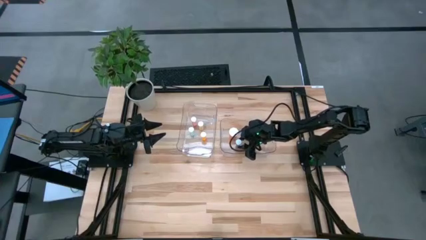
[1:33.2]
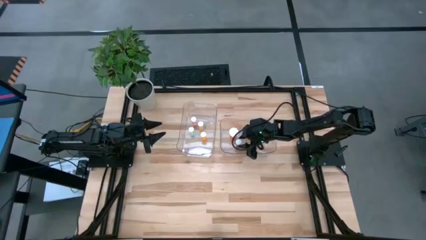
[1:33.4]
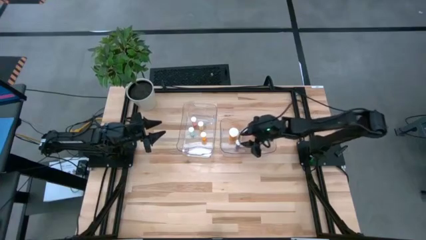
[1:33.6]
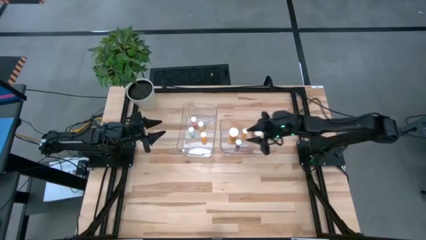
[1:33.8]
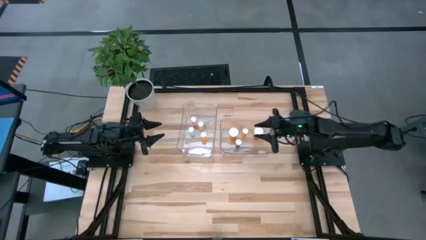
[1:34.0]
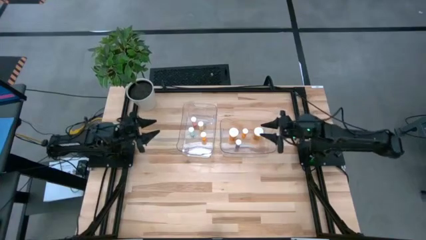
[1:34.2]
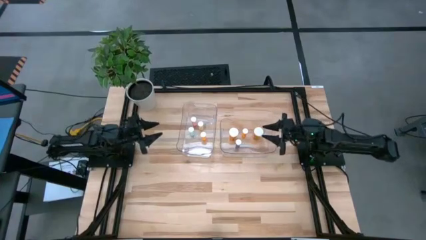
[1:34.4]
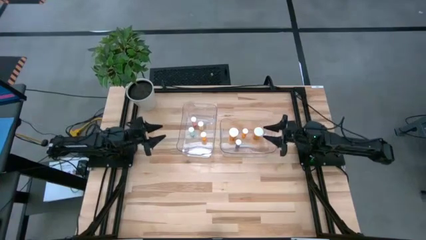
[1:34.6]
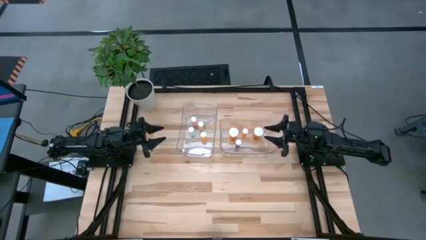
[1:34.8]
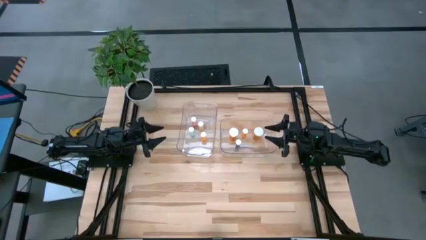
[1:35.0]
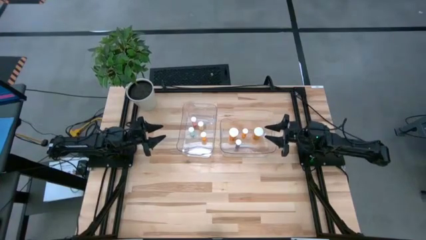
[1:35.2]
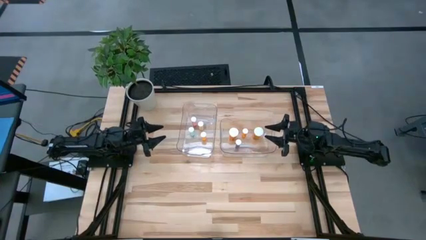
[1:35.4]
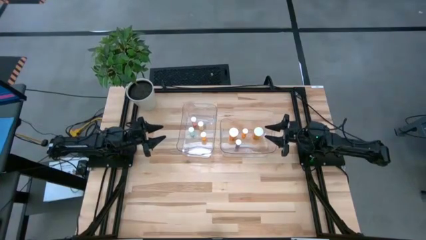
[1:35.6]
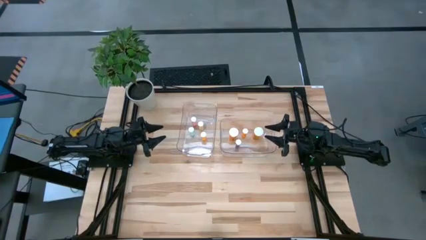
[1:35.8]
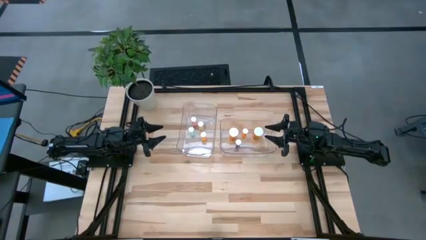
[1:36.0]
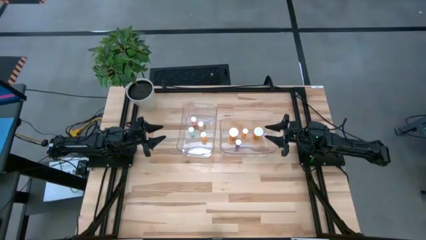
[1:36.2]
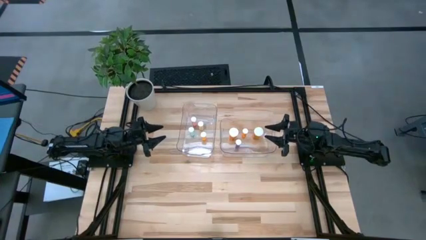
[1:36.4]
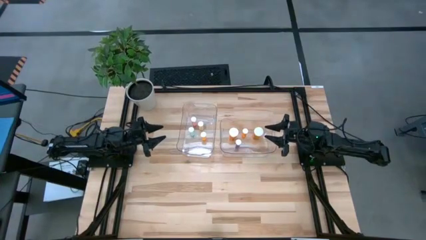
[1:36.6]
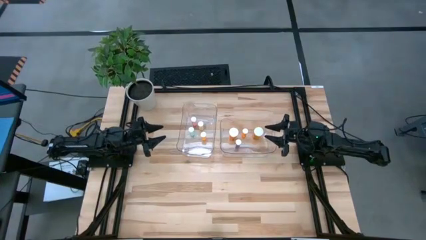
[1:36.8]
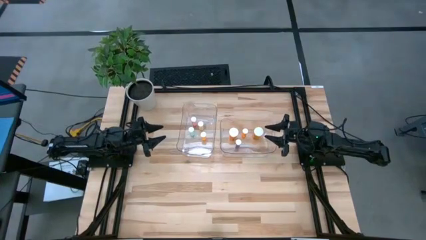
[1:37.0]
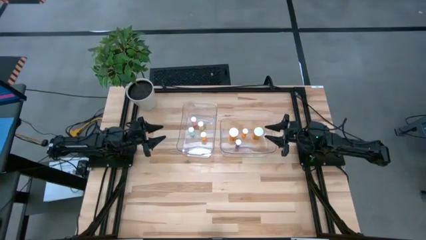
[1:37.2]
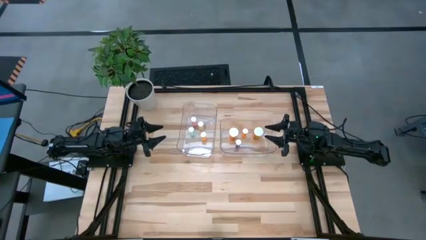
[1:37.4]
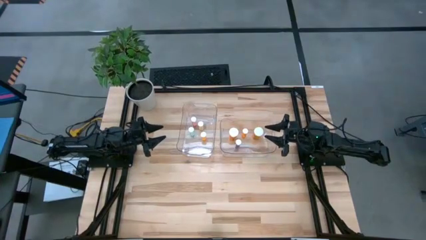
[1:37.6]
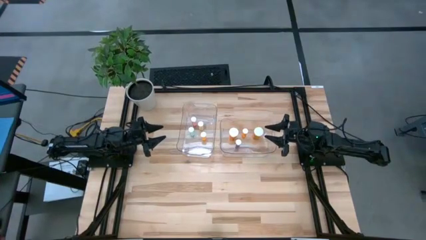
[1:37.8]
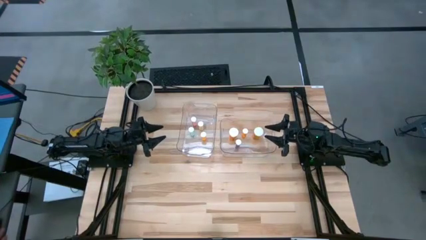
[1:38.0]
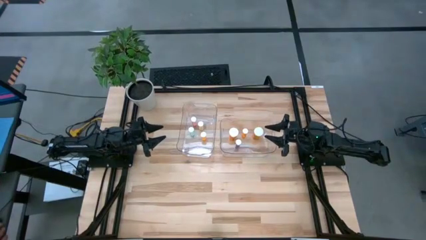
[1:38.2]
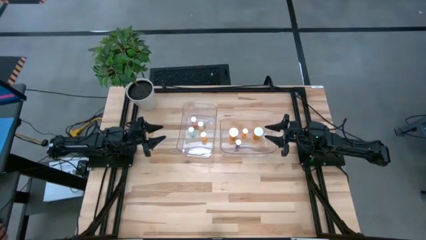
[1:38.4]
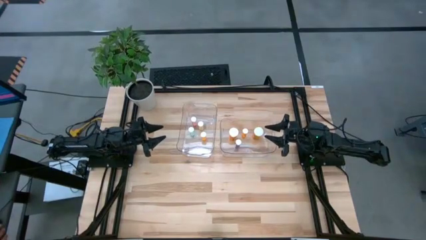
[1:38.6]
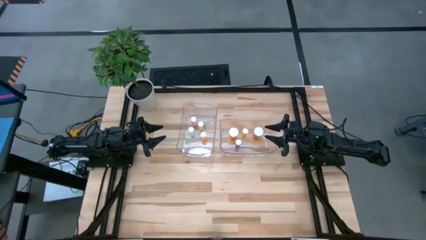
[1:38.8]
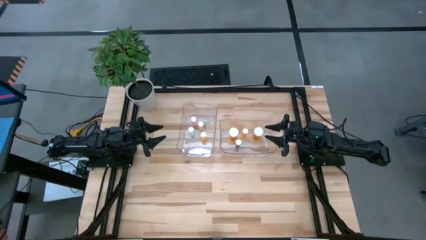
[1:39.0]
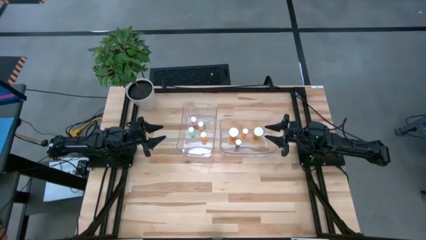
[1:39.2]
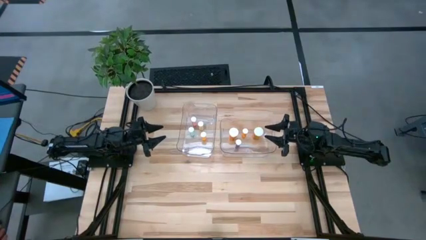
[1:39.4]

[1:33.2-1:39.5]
Task: Pick and place medicine bottles into bin by pill shape (circle, oval)
Return to Home Position

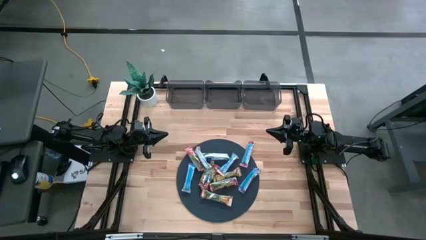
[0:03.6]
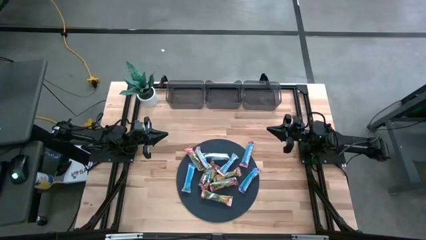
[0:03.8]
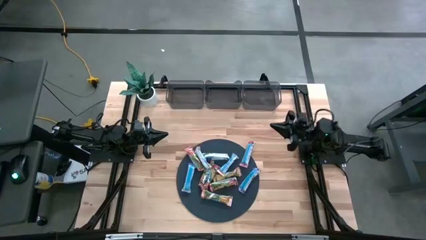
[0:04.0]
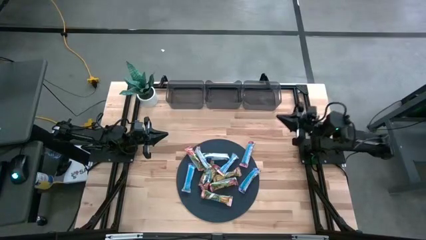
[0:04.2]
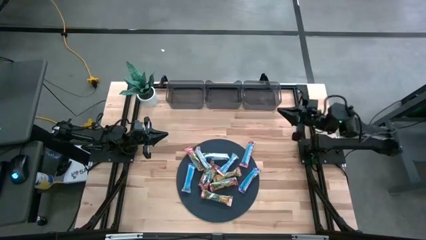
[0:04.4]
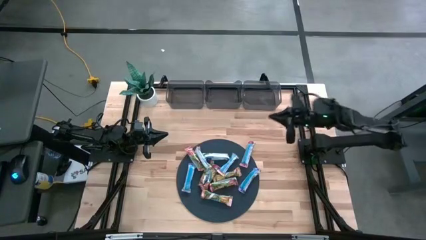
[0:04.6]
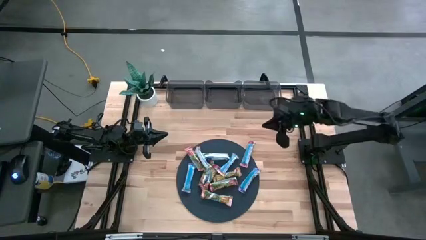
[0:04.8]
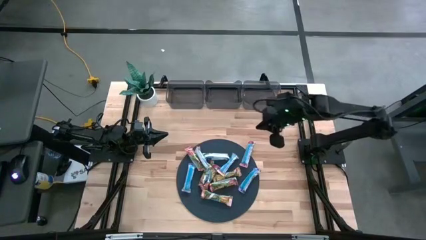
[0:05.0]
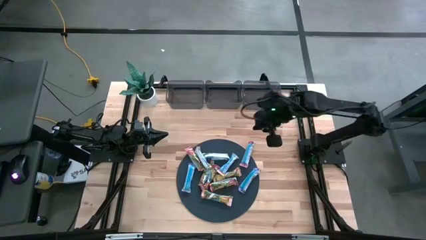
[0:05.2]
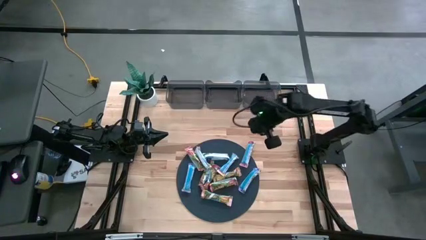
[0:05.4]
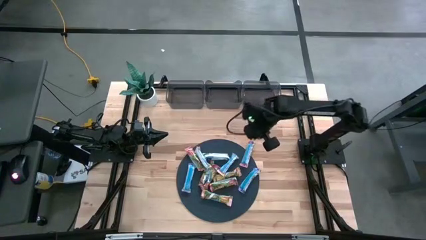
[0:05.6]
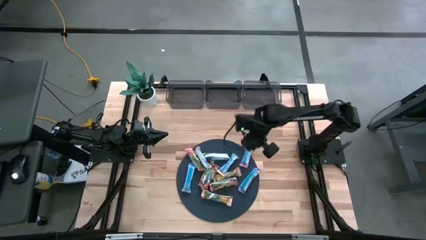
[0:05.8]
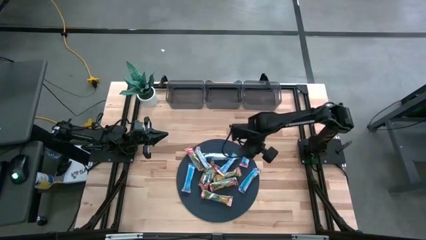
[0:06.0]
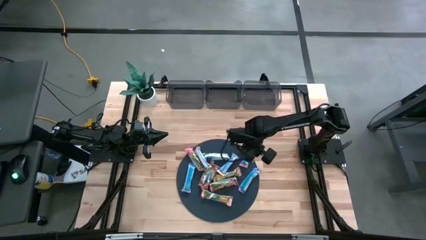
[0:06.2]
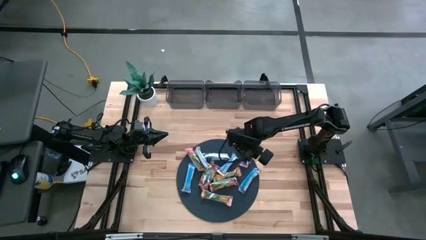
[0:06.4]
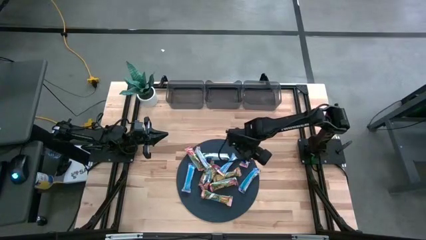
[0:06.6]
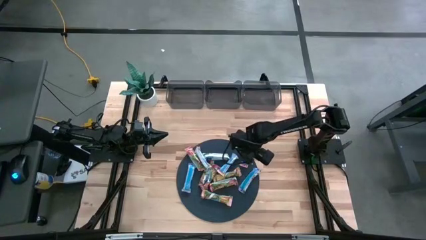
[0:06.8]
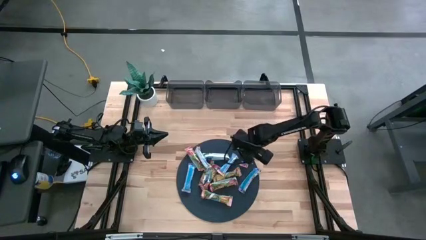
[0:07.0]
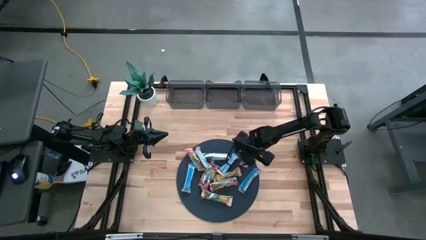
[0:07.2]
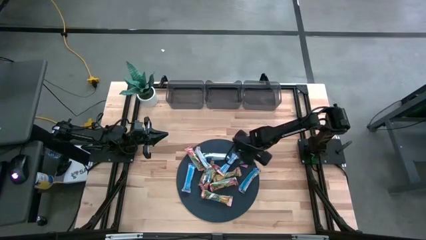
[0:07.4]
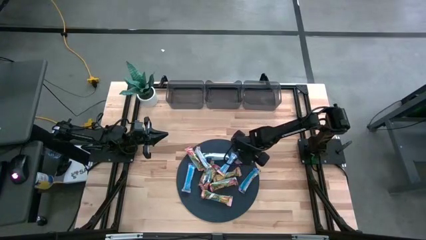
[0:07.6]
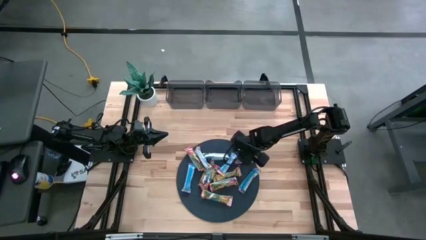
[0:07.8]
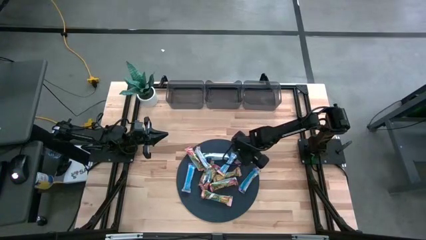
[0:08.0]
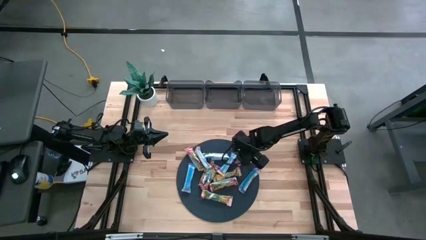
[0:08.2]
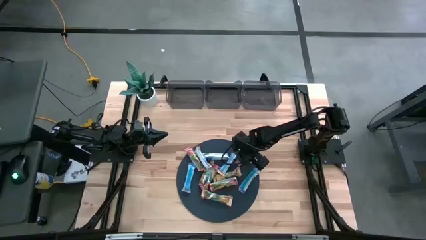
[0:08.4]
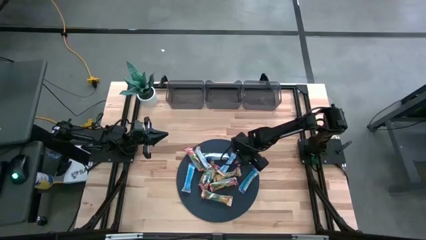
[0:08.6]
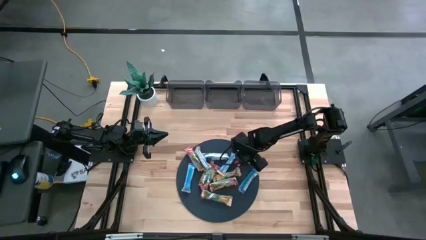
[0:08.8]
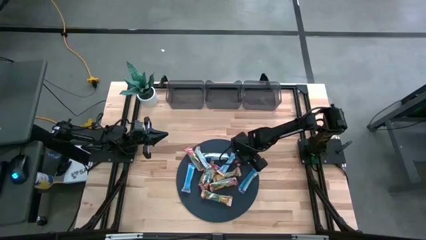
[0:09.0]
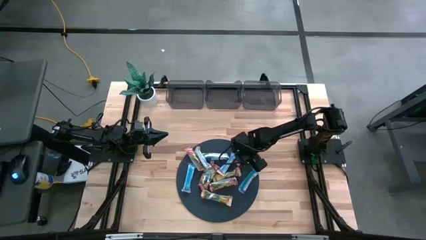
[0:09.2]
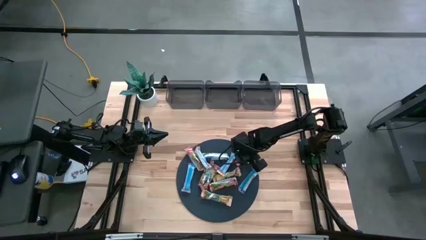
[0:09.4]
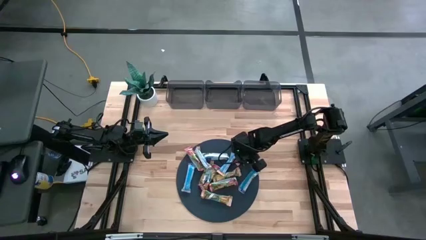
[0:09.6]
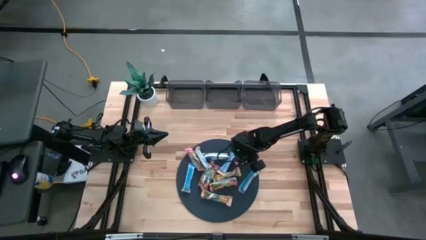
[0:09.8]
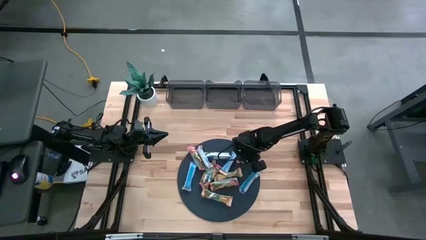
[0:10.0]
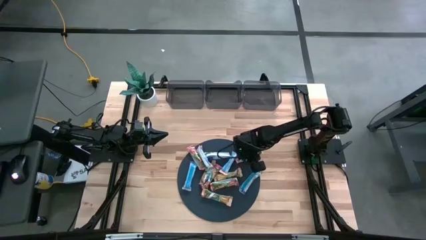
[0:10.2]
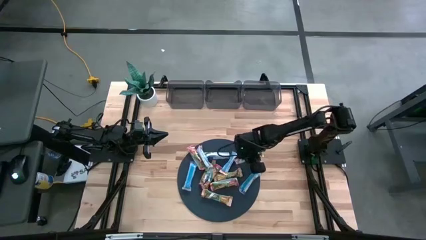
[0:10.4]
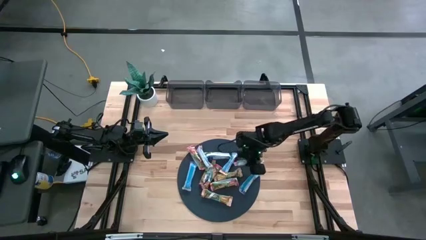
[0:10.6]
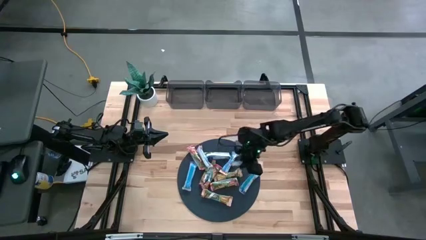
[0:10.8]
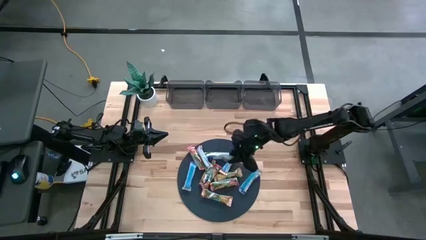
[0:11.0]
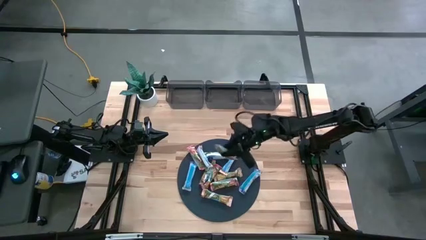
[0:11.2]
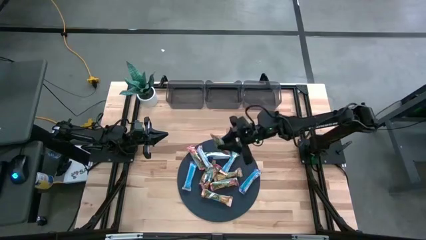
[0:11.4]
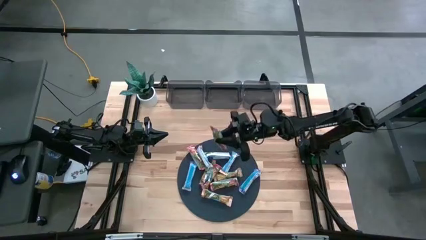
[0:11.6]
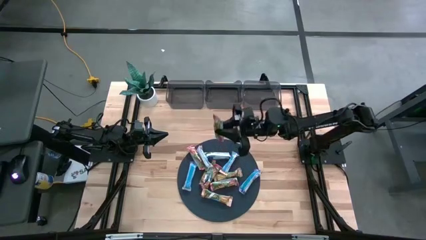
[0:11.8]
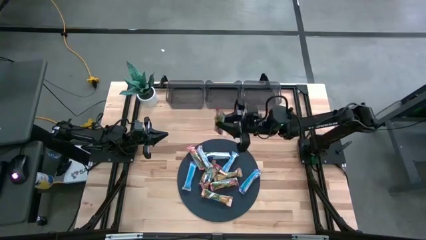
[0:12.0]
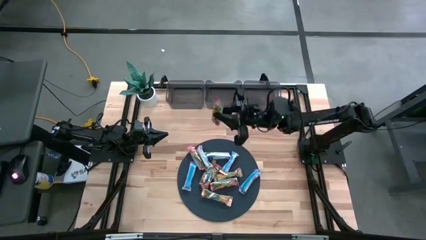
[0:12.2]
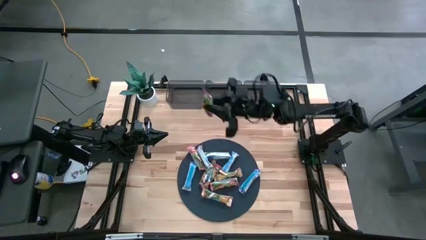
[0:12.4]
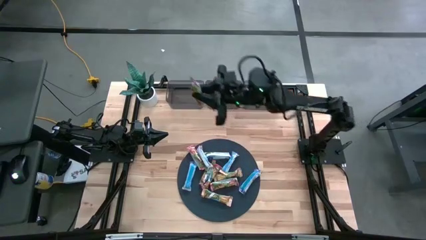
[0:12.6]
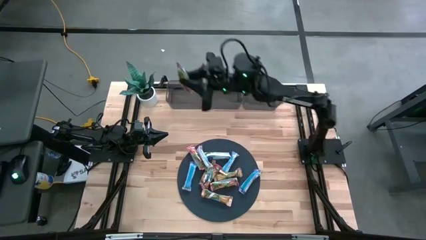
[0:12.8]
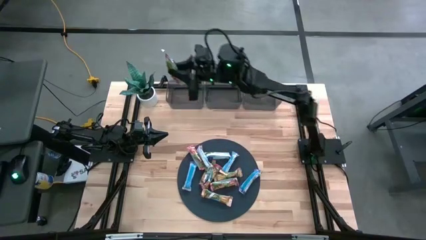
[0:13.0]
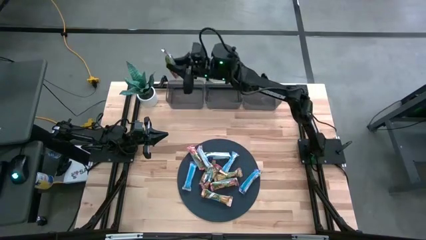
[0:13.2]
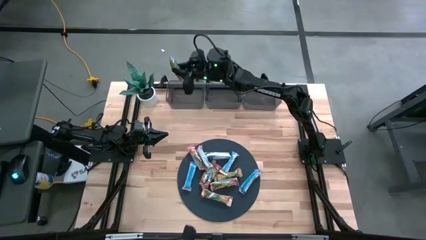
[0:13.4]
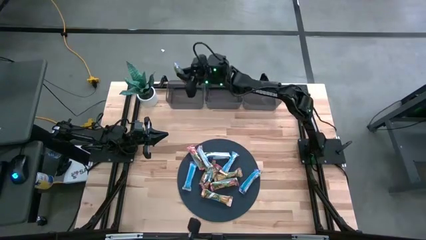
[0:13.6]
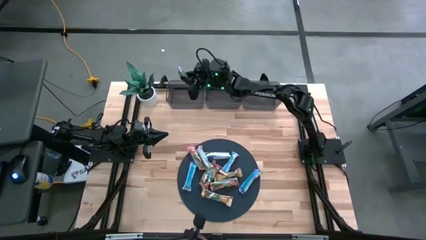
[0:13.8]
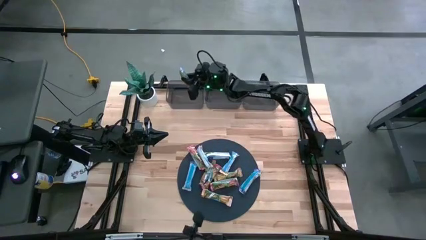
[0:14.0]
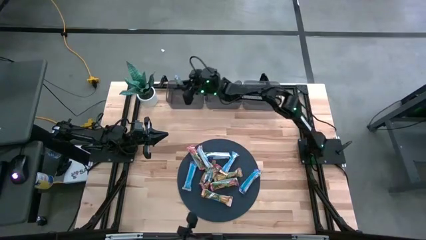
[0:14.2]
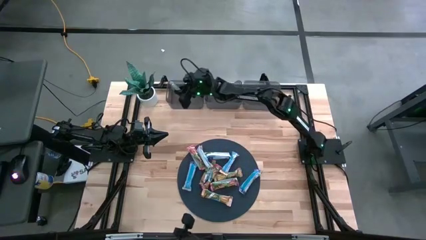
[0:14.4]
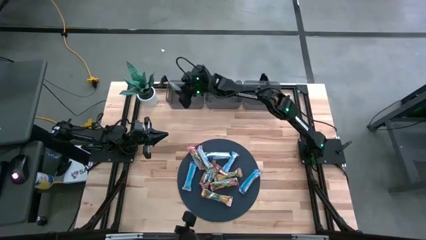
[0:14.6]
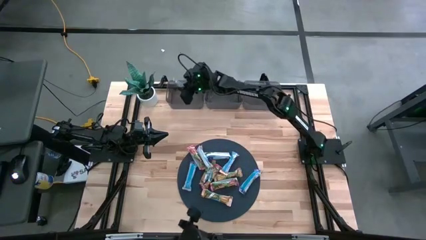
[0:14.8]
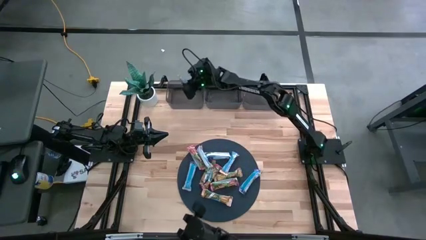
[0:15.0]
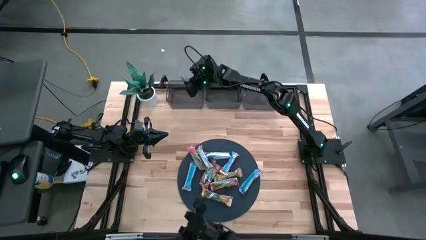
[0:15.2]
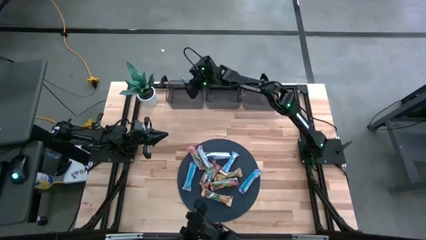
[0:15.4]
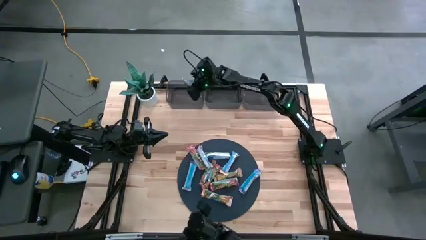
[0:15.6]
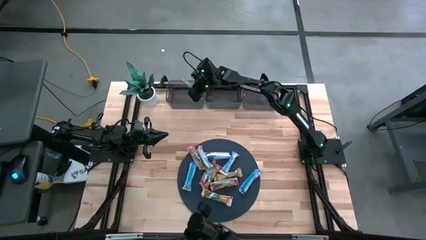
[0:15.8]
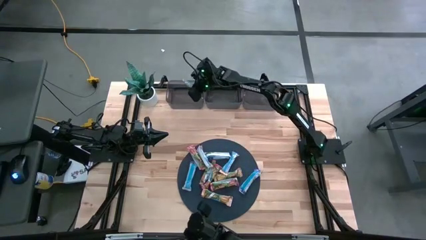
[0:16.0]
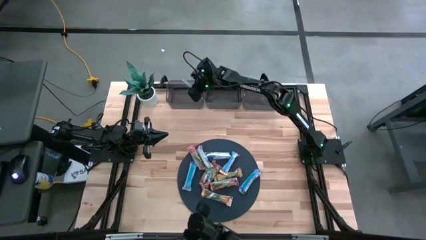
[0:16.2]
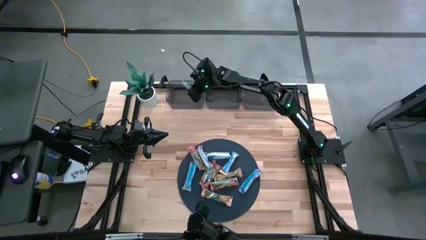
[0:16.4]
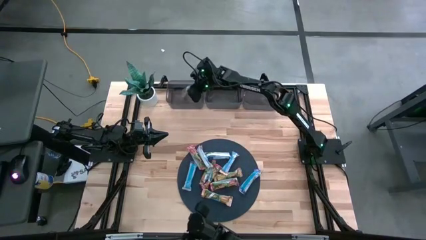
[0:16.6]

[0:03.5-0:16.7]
Task: Pick and place Granola Bars by type
Put the red granola bar into the left black bin
